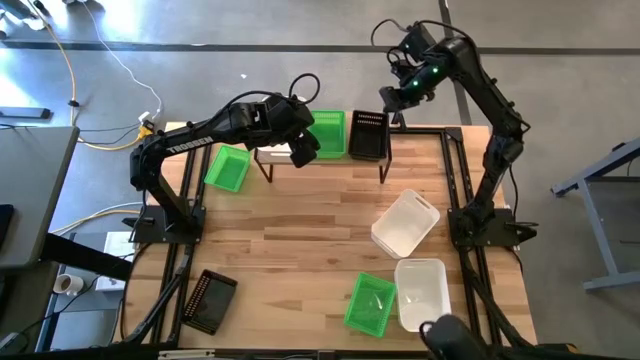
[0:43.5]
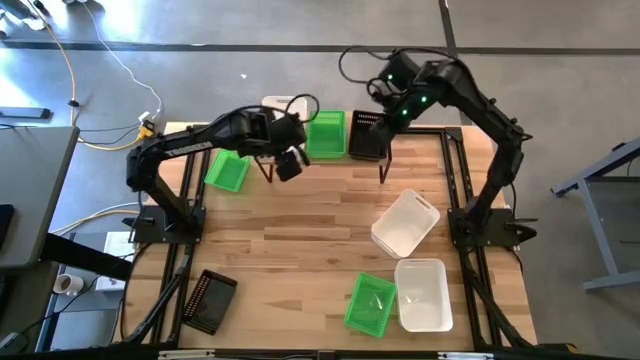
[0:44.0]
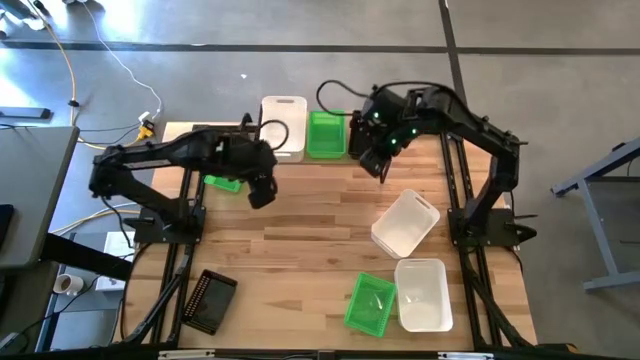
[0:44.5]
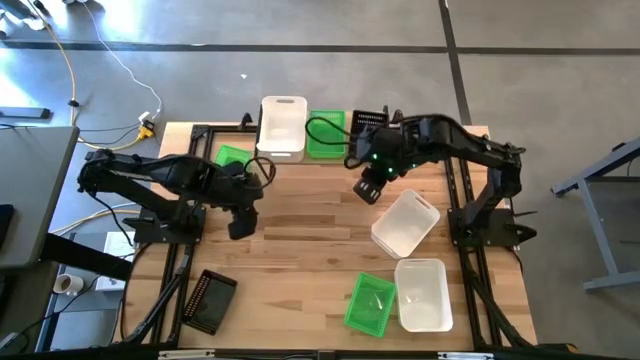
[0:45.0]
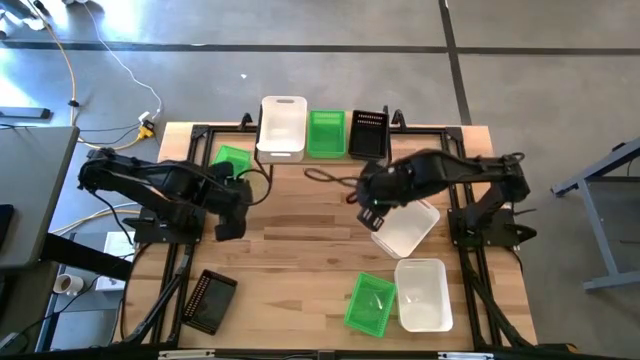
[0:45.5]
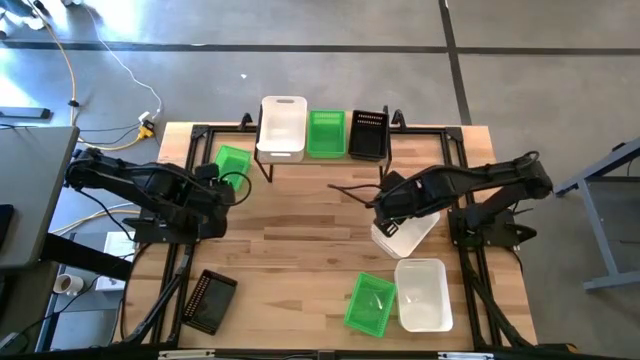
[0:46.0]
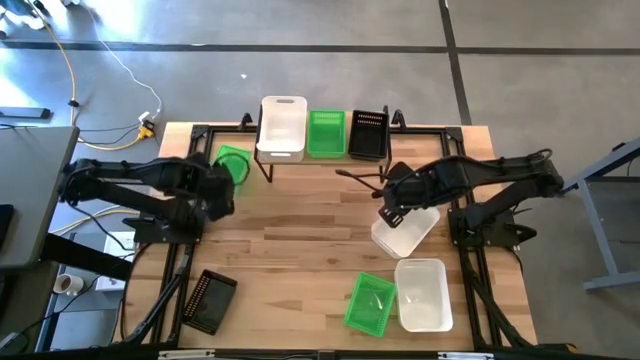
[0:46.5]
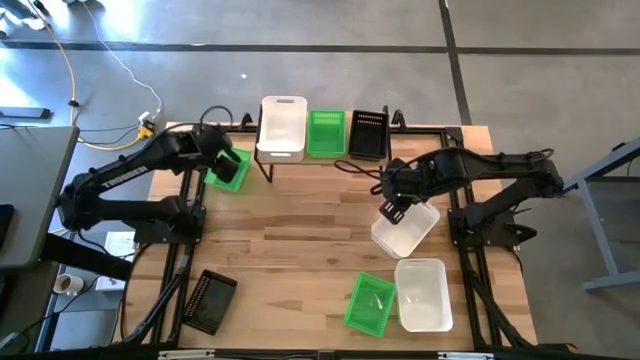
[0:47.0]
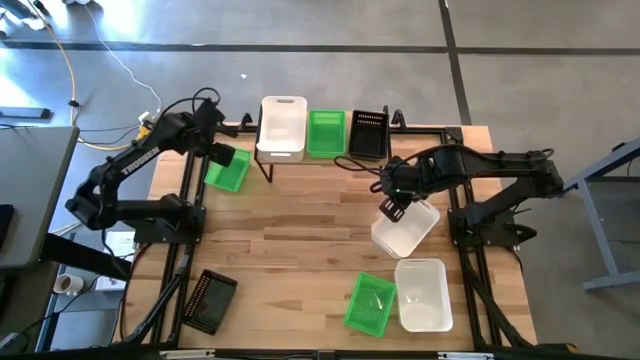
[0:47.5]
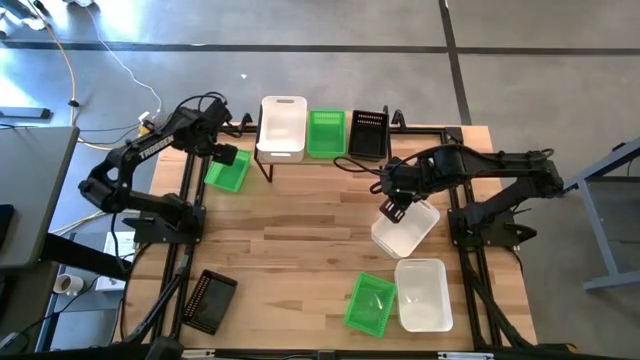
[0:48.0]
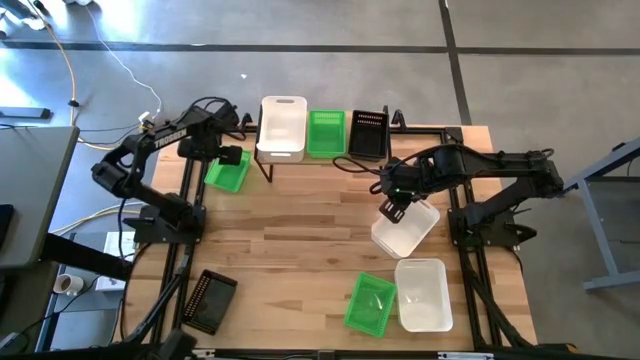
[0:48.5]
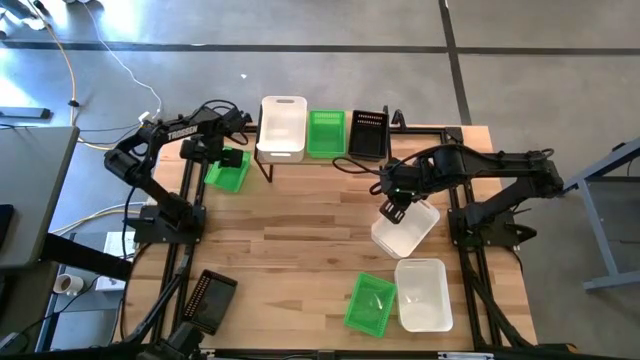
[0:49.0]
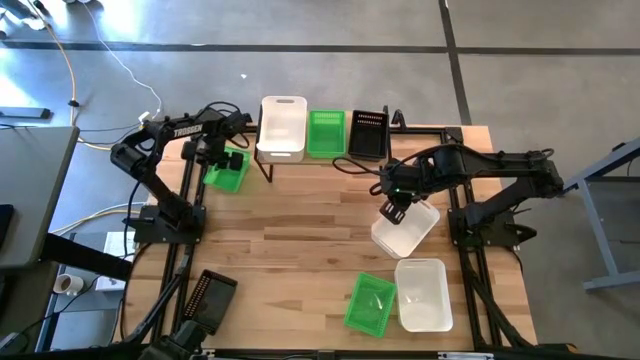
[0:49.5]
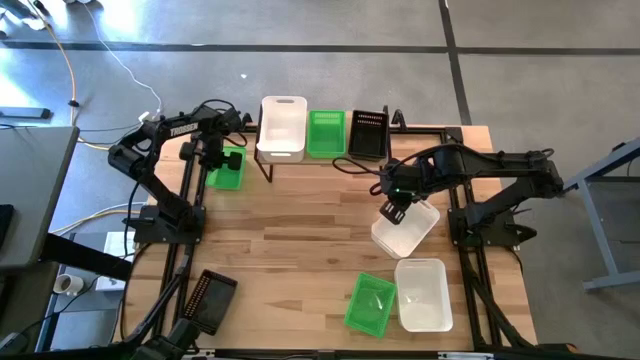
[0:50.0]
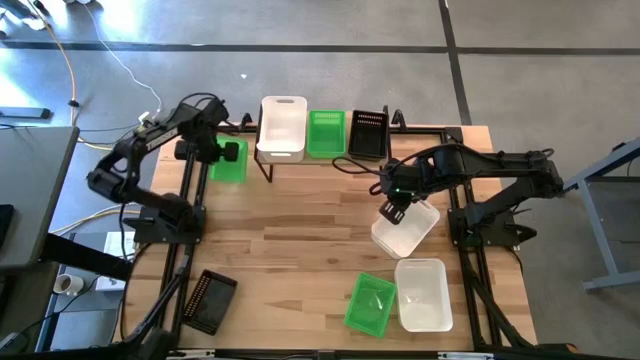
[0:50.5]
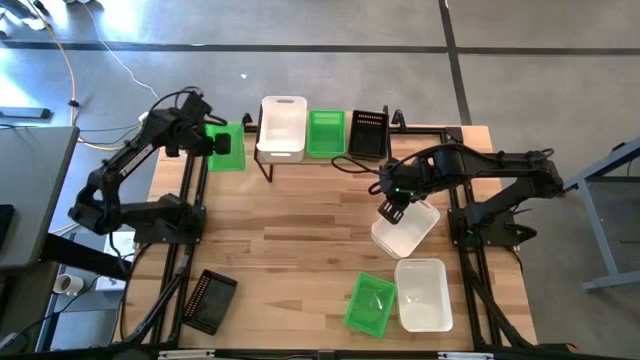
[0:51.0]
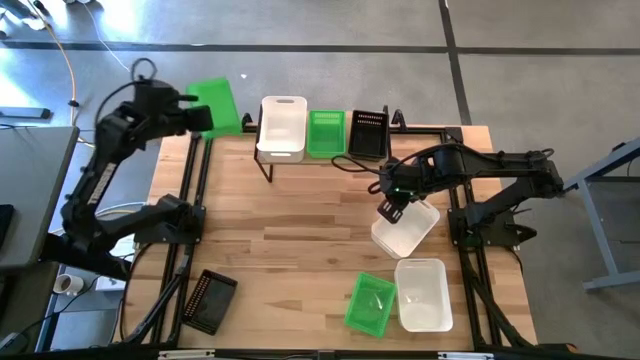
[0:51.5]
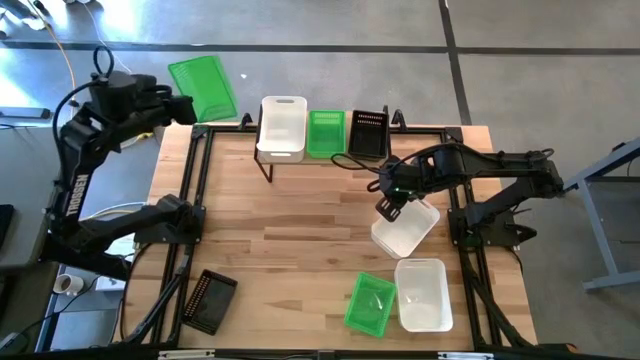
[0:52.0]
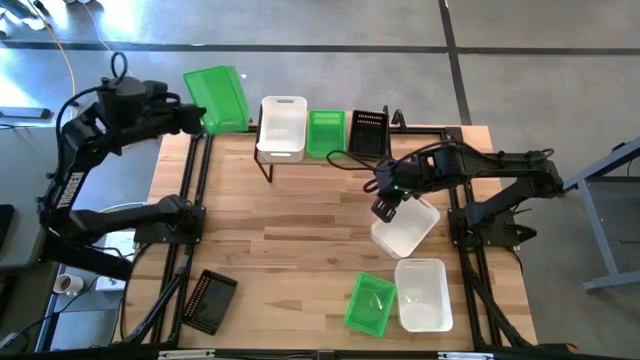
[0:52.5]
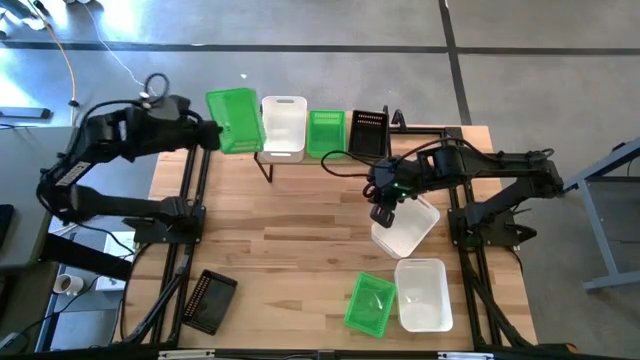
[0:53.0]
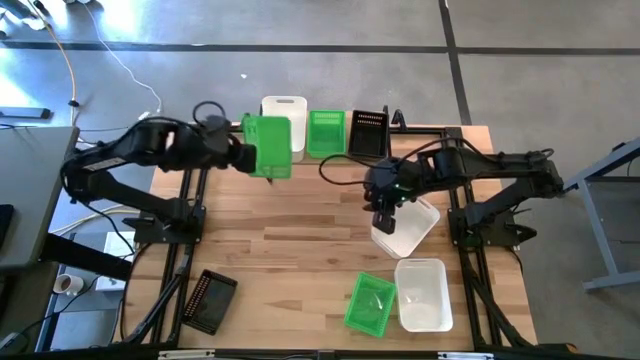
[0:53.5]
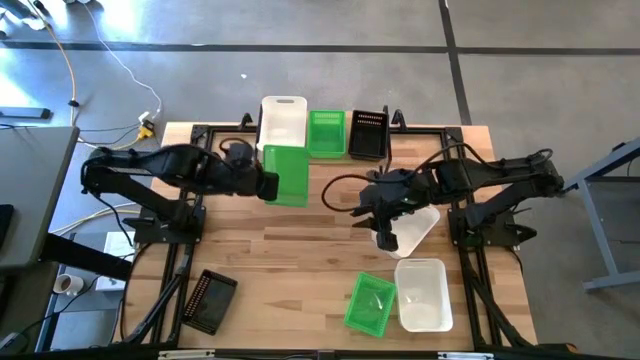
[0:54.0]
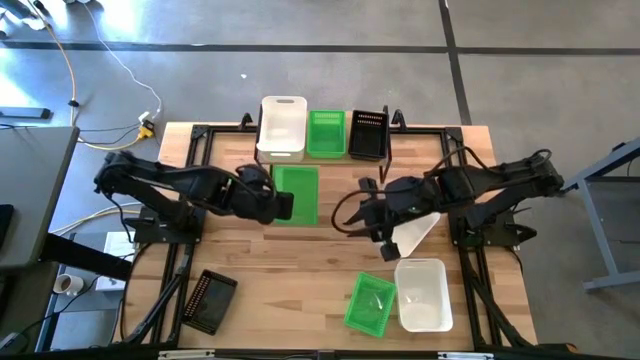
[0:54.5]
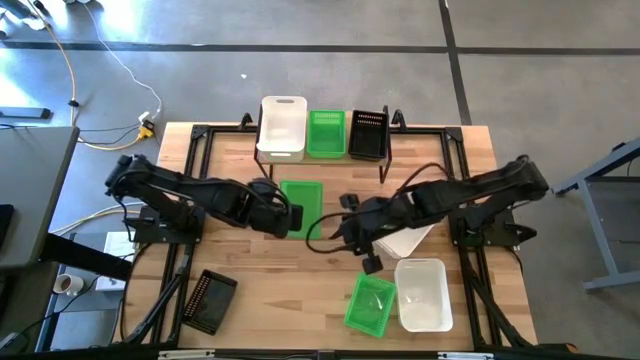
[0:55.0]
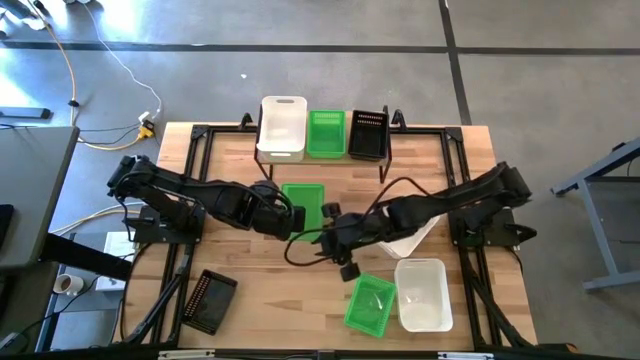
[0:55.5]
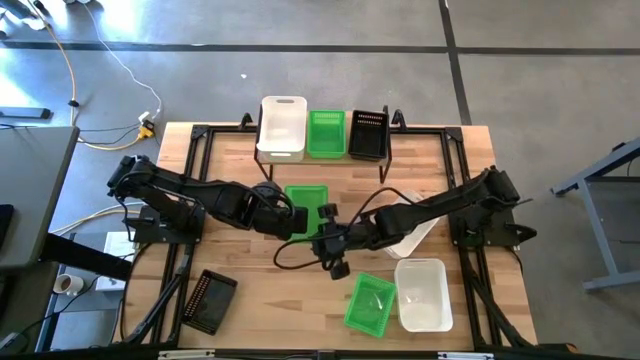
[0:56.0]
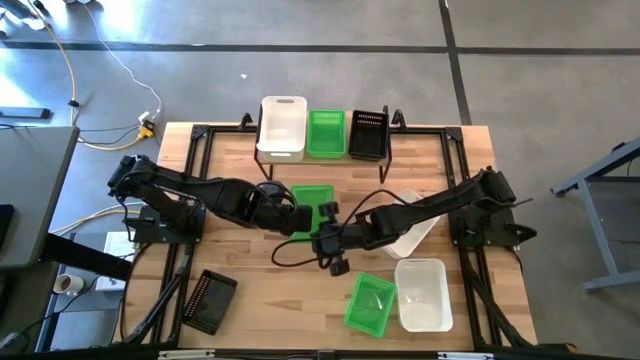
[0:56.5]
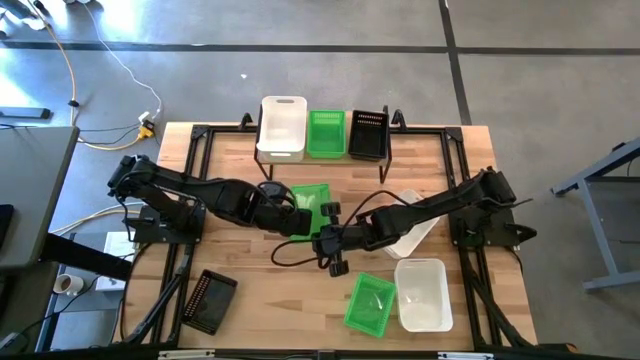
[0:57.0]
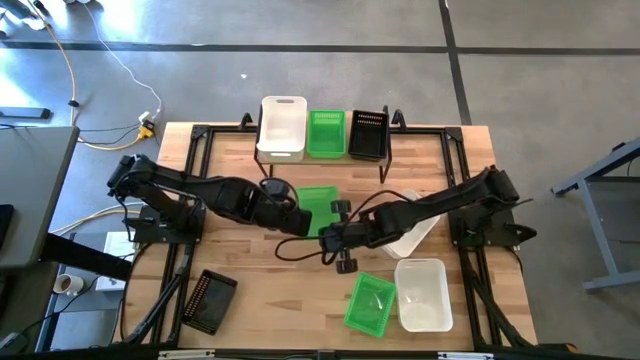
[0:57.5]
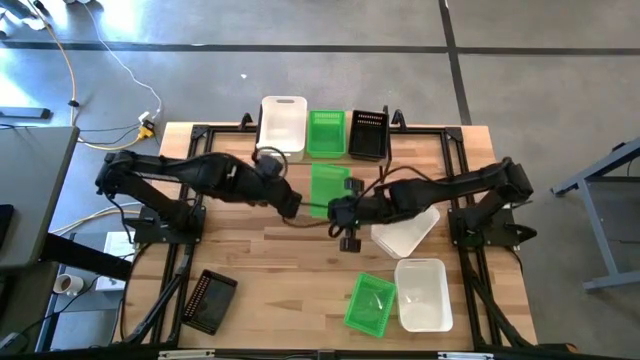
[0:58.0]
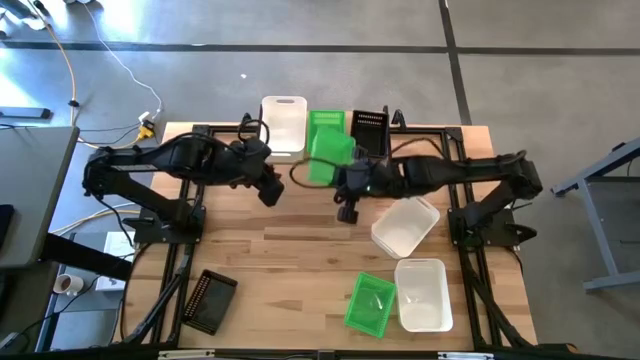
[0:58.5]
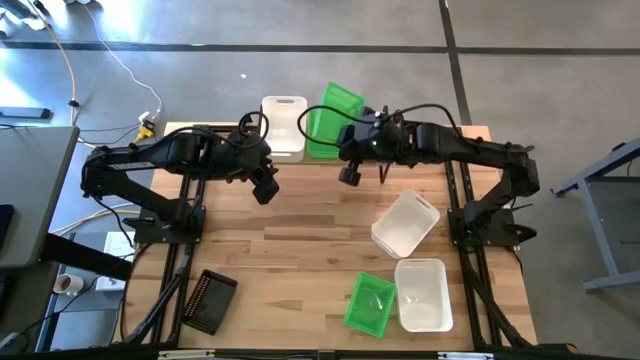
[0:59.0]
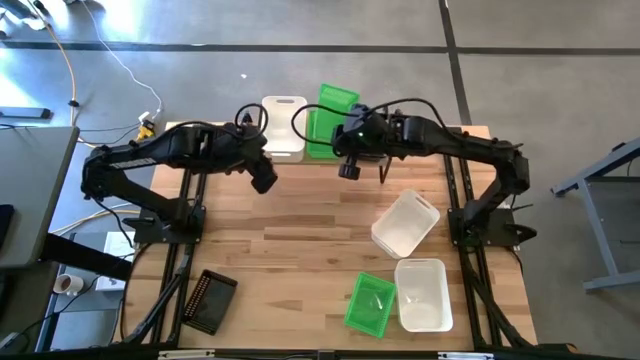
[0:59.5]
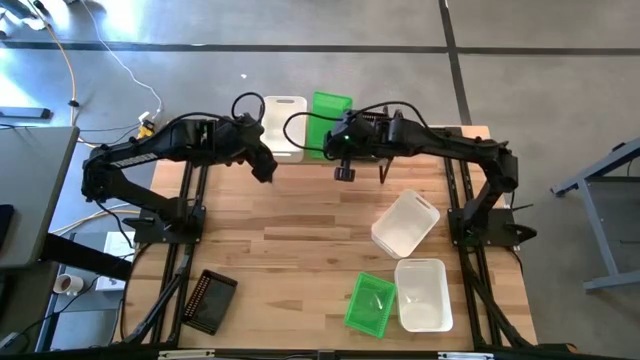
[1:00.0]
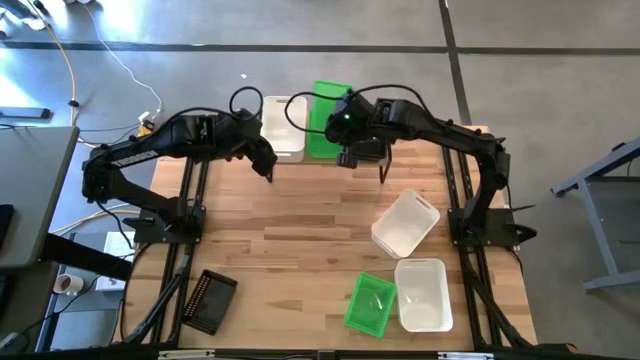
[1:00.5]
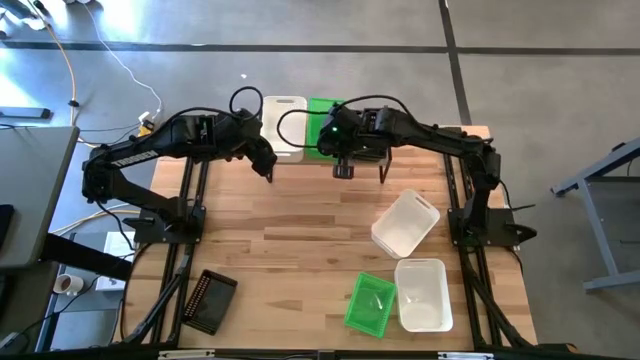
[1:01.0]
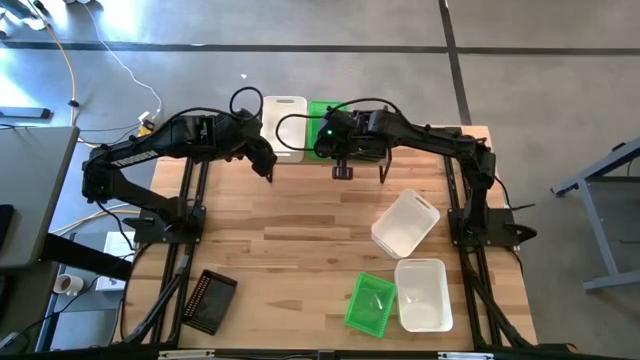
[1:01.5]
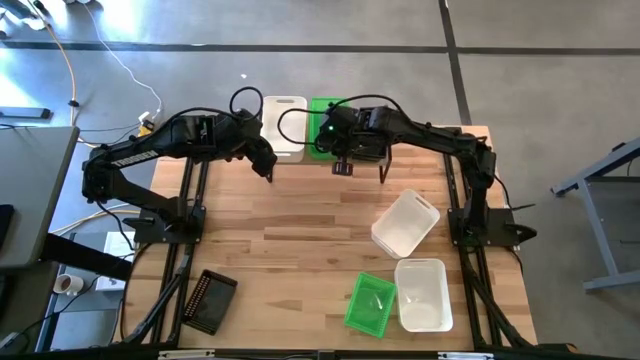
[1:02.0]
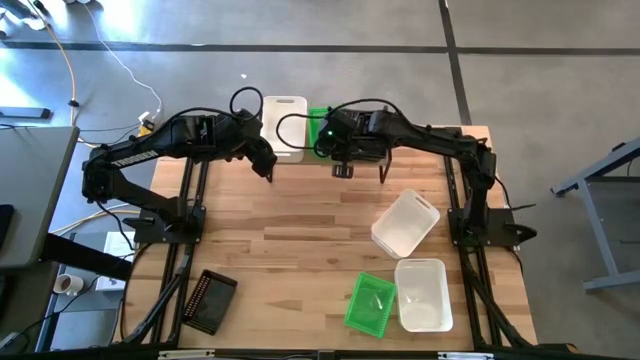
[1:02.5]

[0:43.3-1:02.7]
Task: Stack baskets on shelf by color
Stack the top green bin on top of the green bin

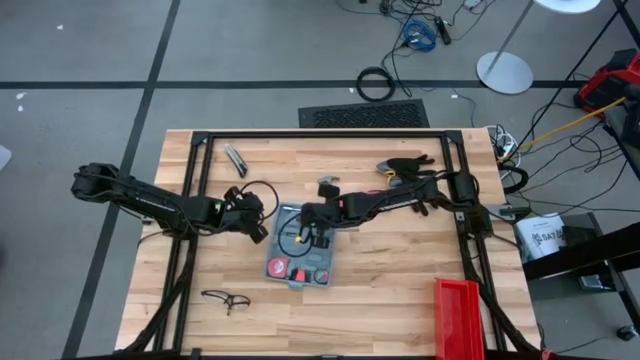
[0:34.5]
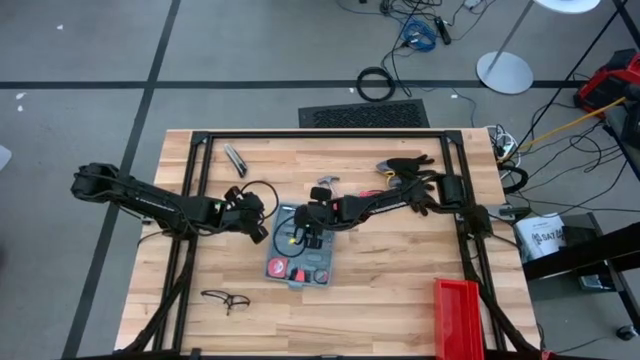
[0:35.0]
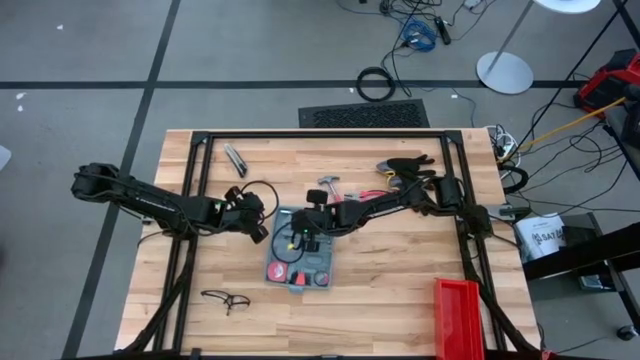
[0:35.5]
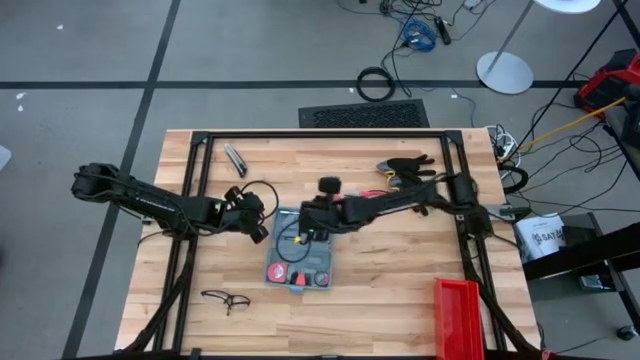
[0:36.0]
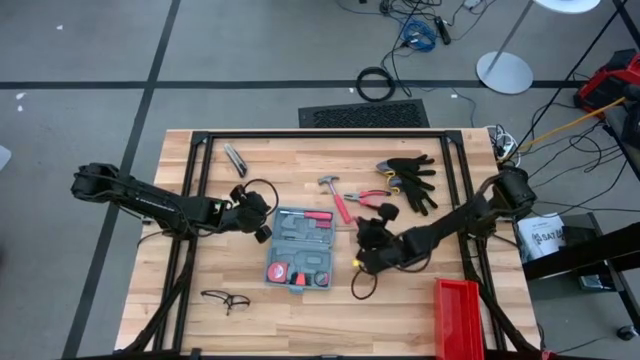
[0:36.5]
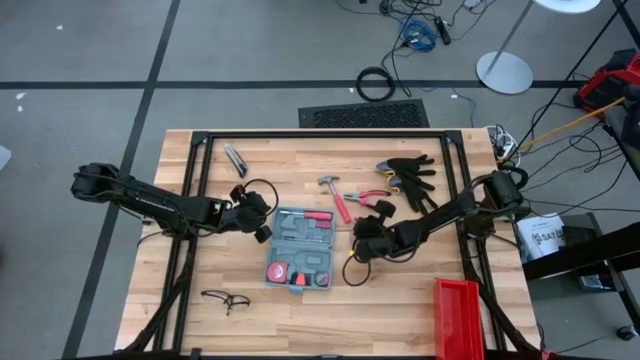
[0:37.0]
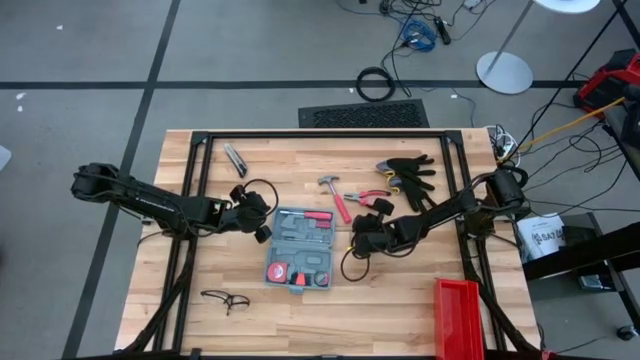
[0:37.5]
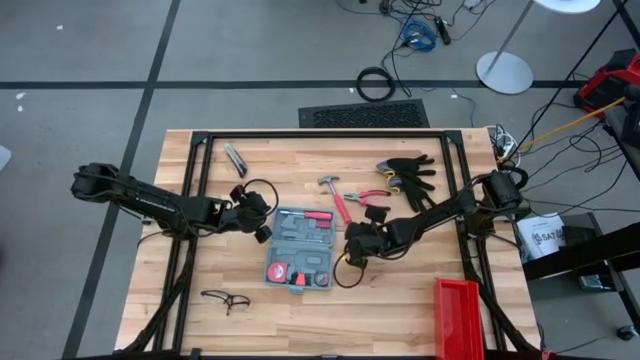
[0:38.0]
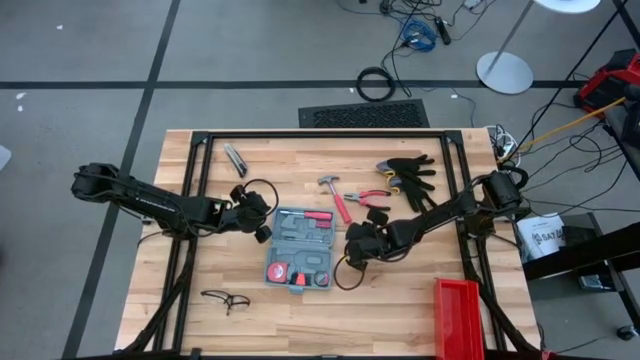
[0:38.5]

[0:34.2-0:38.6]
Task: prefit tool cases
Remove the left pink terminal block from the gray prefit tool case
